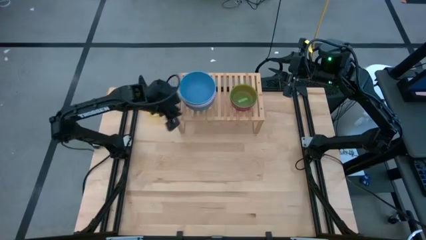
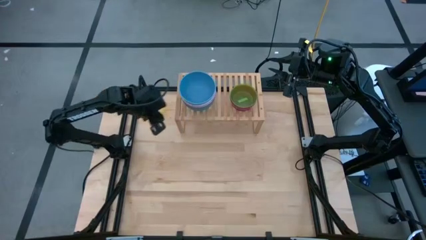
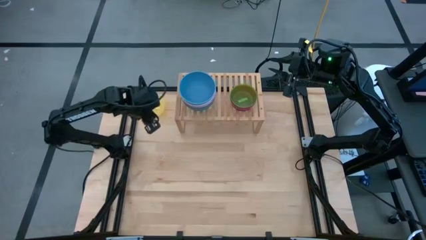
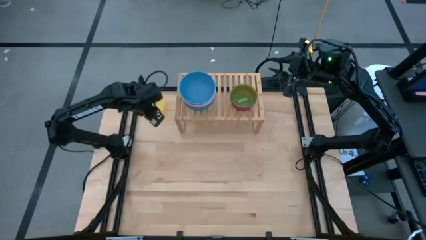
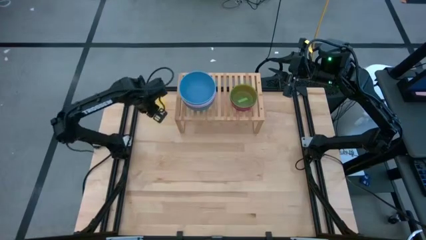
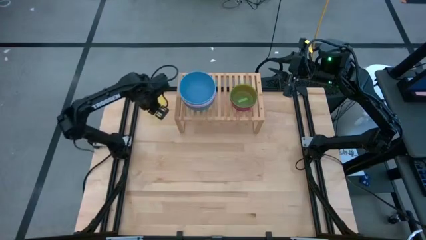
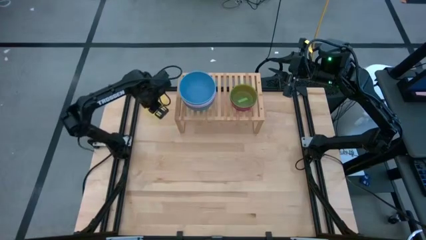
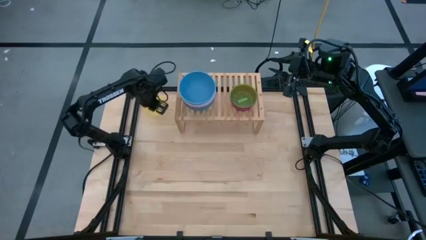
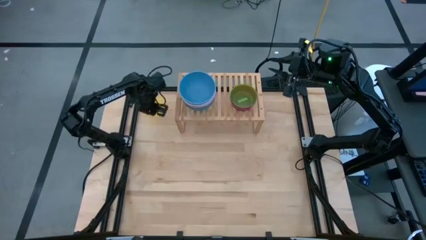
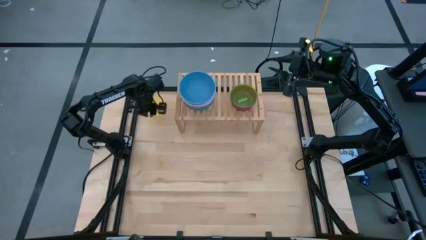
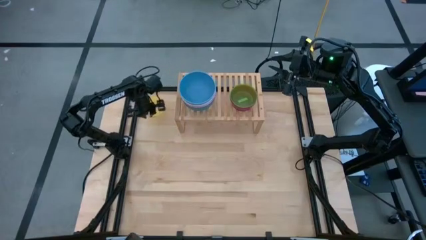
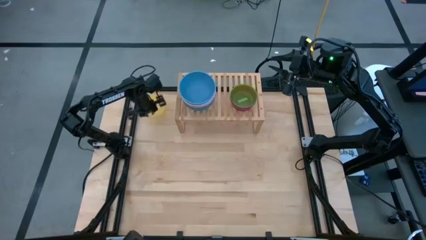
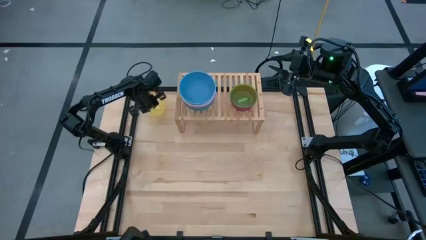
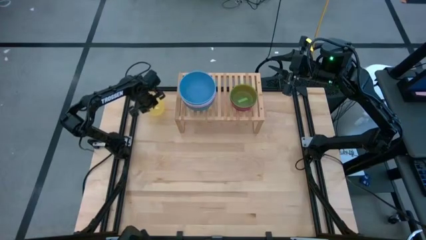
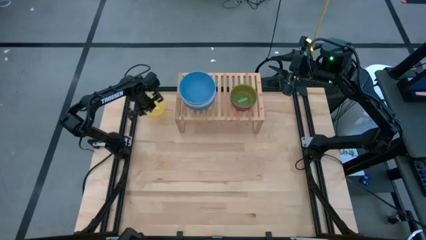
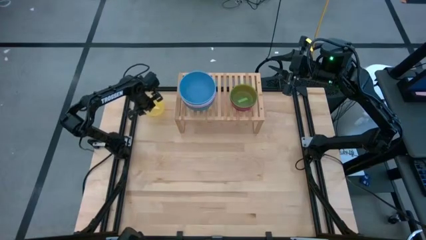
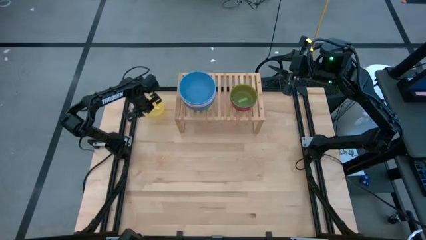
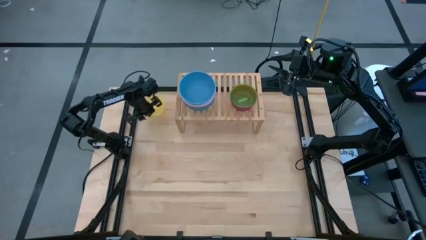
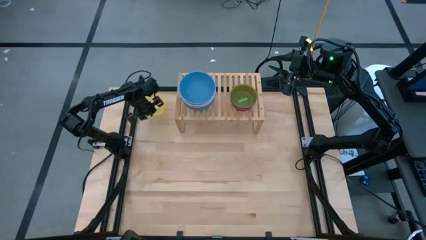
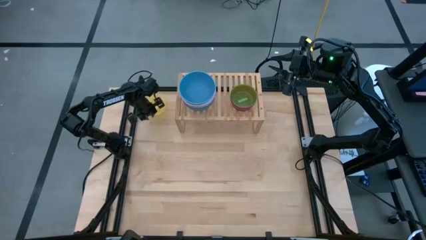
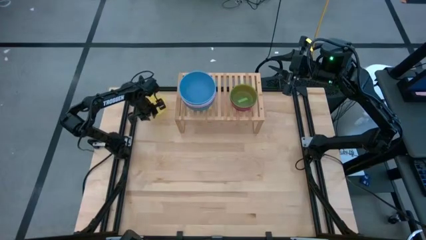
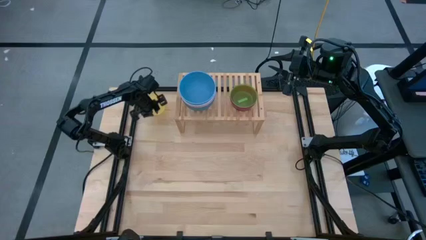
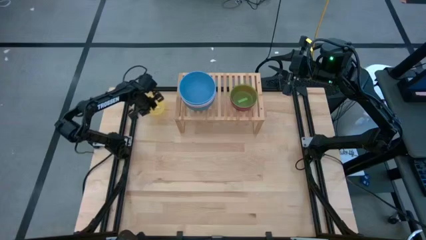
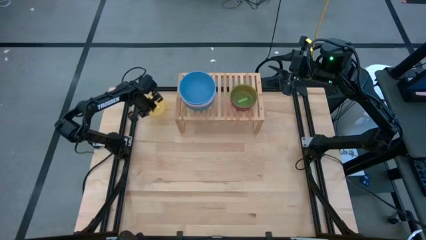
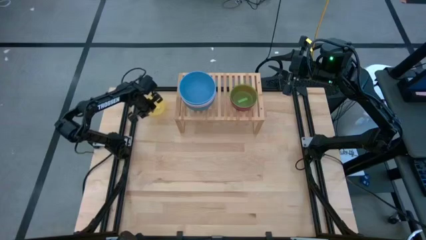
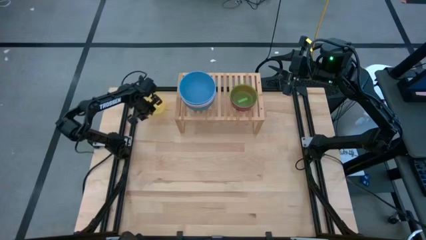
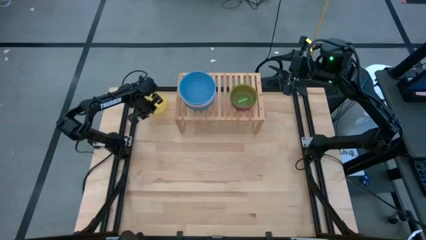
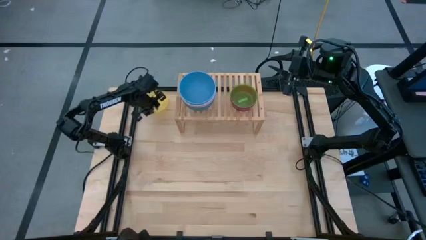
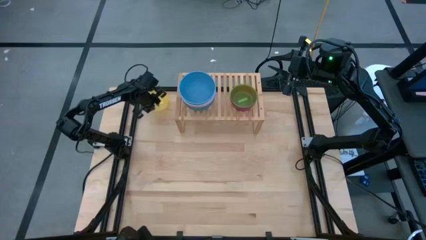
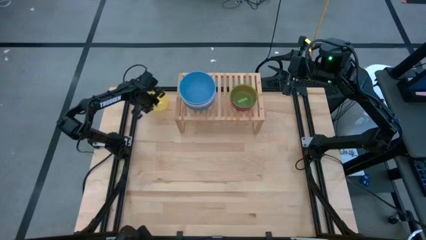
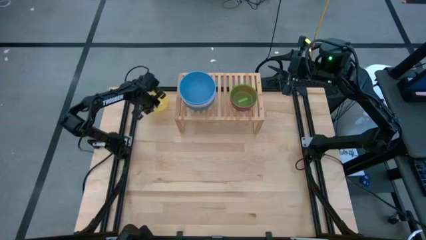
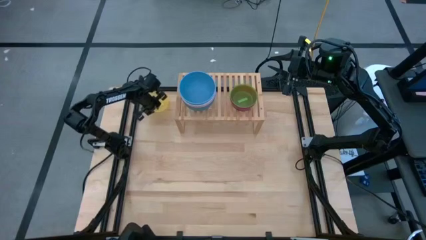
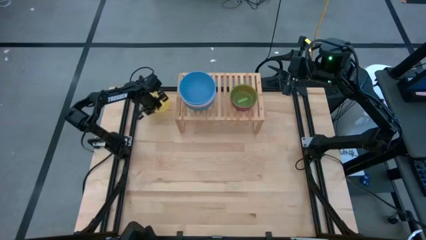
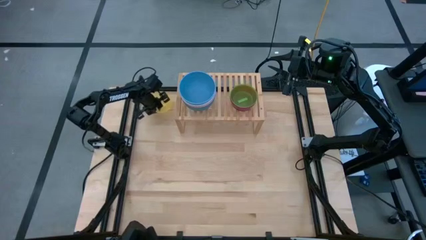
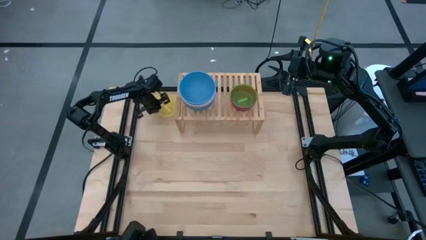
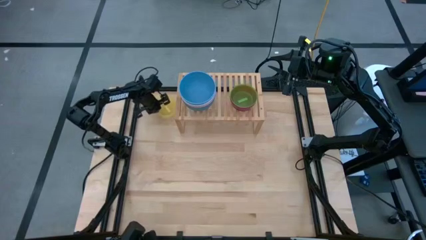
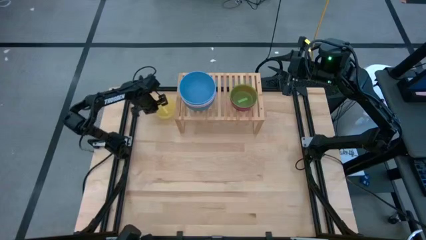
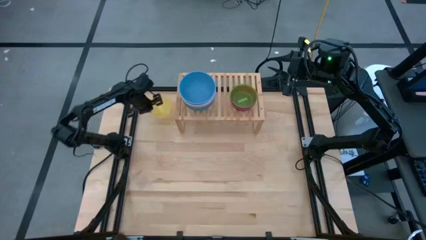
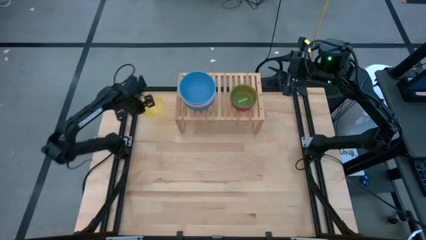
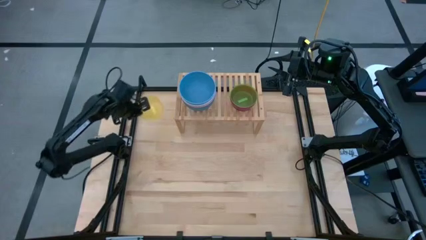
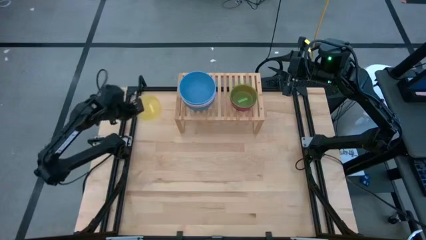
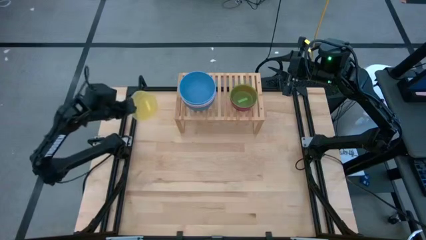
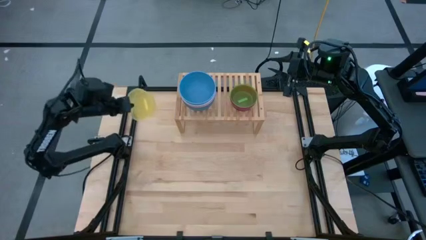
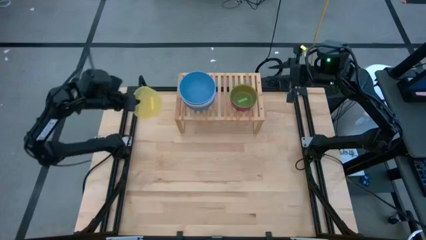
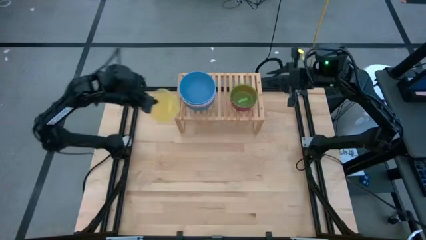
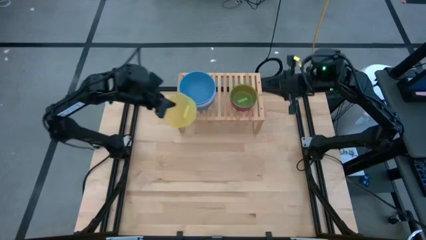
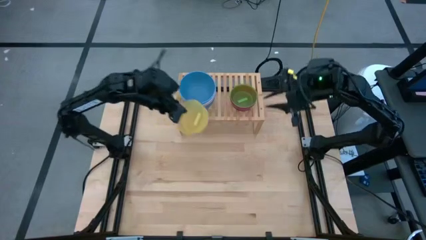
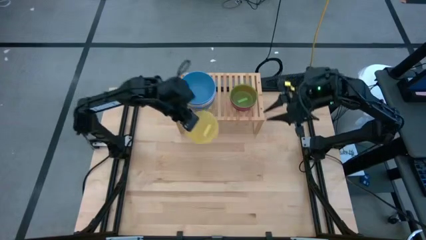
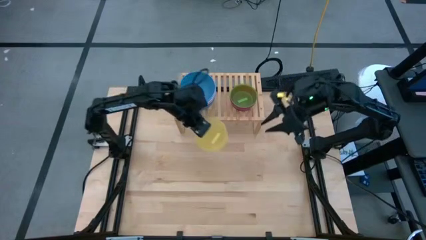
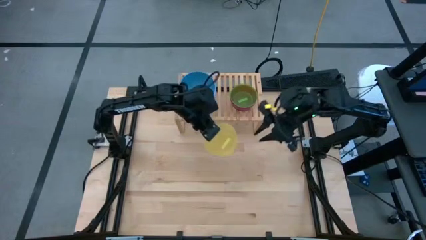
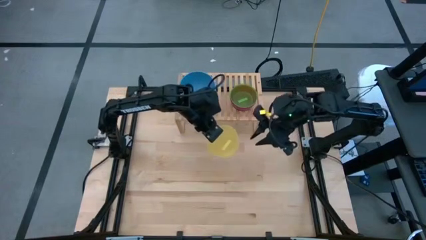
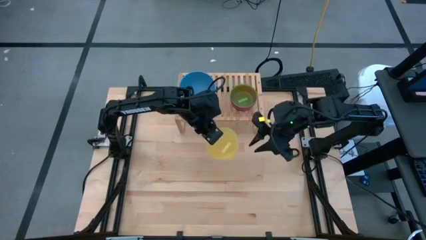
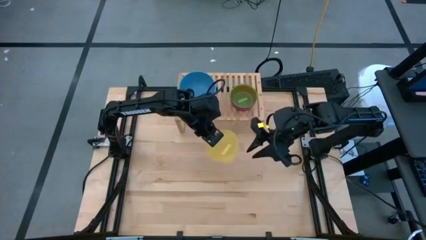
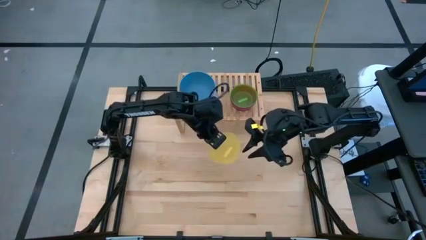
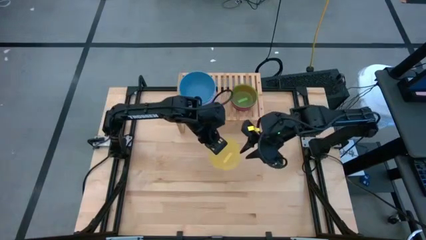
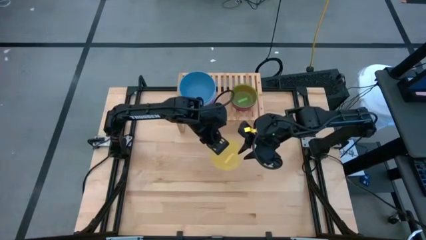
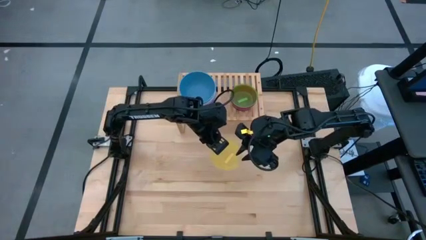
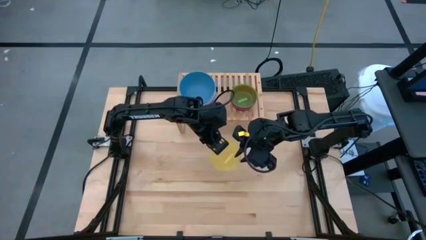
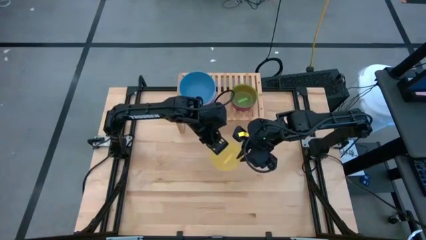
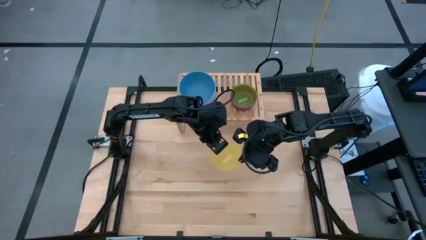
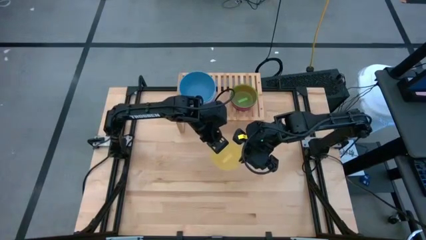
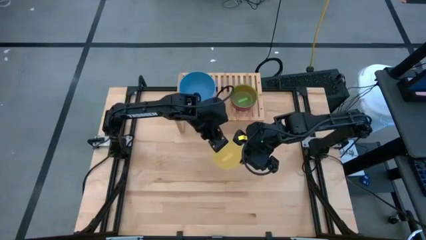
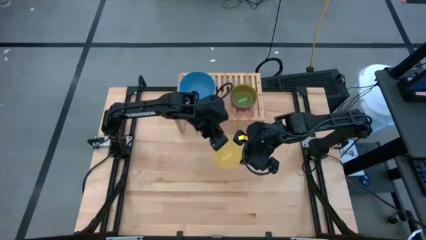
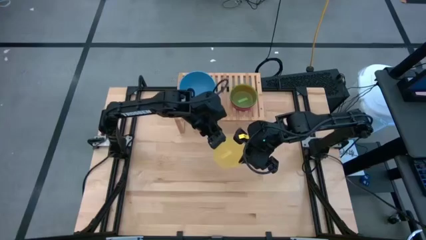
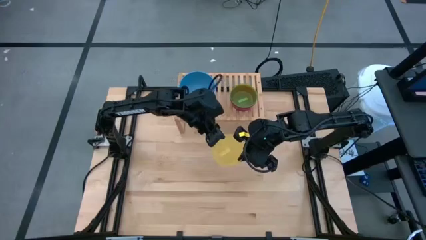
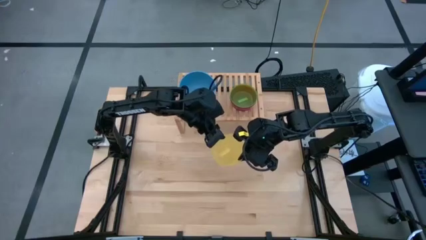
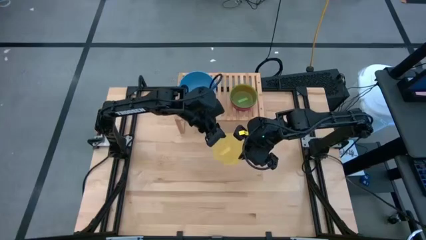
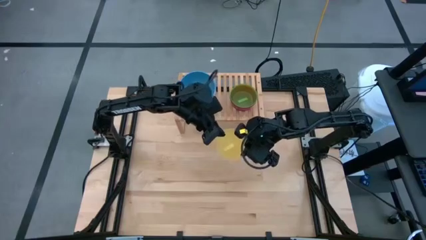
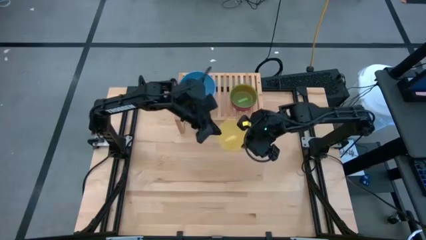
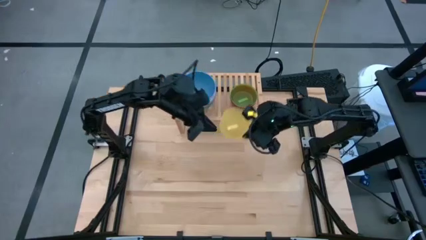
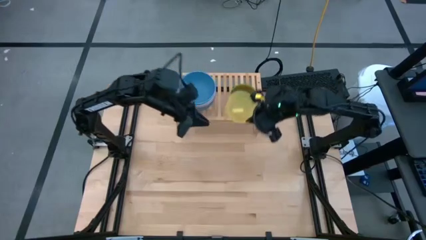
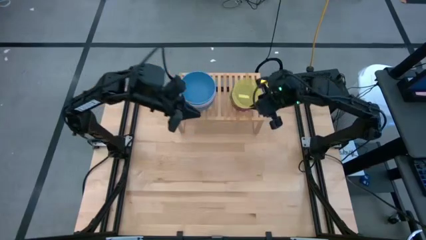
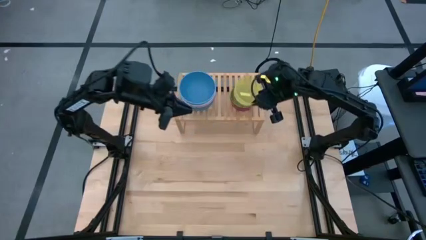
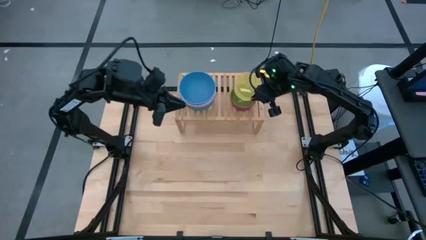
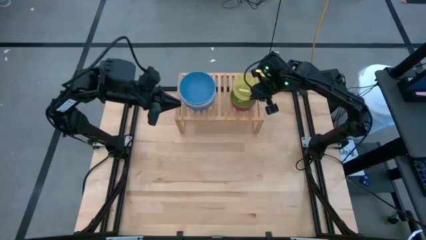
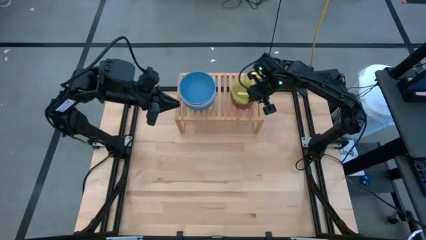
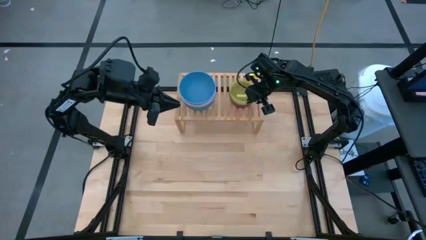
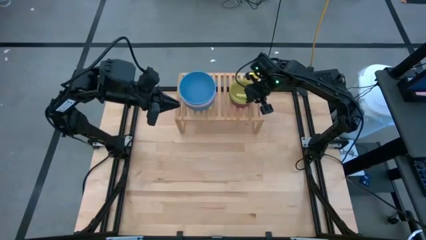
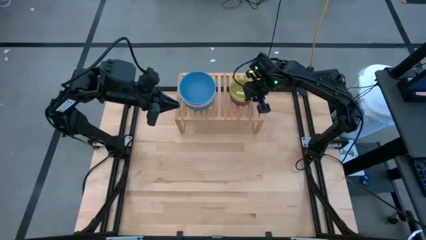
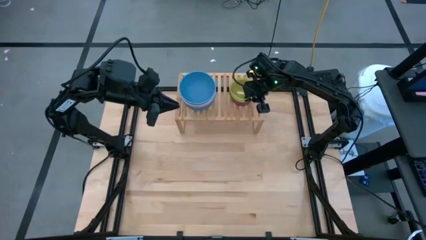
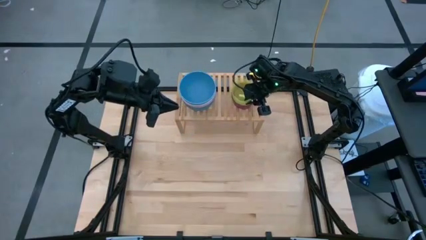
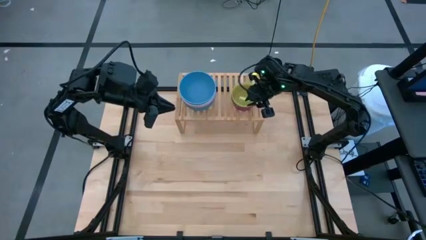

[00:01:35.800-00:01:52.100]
Task: Place and stack bowls onto a shelf
Stack the yellow bowl on top of the light green bowl on the shelf
